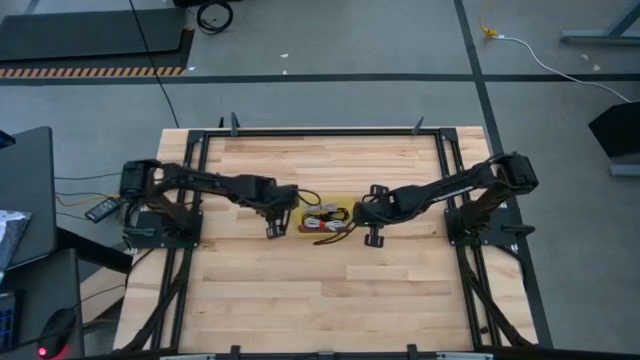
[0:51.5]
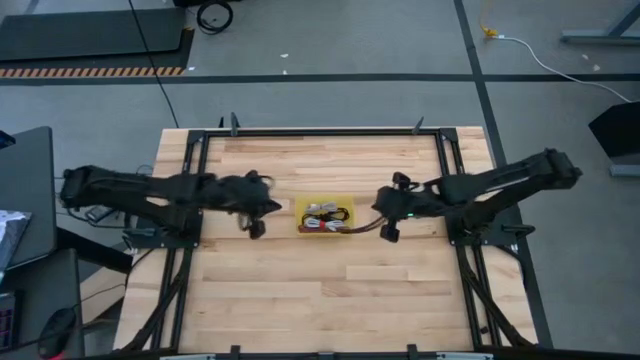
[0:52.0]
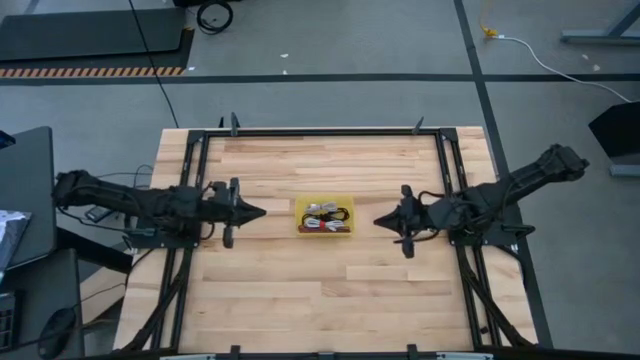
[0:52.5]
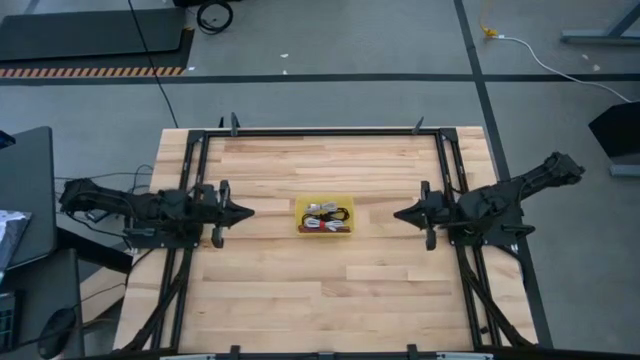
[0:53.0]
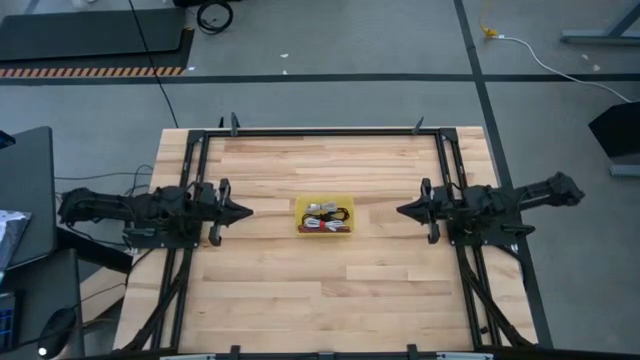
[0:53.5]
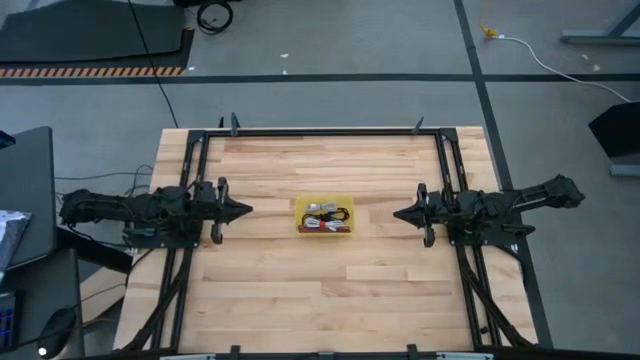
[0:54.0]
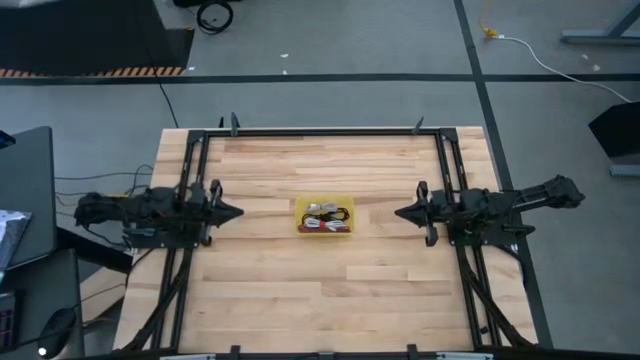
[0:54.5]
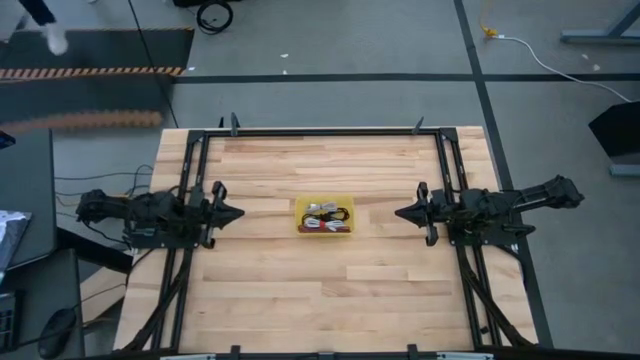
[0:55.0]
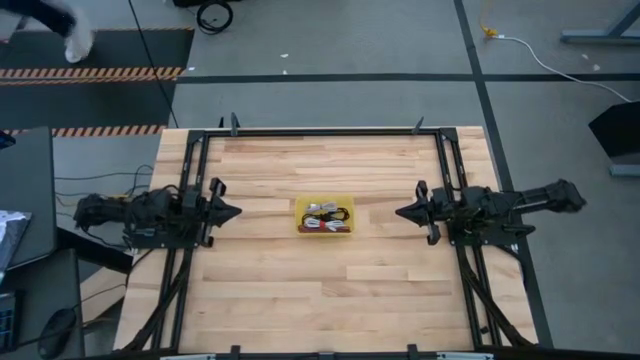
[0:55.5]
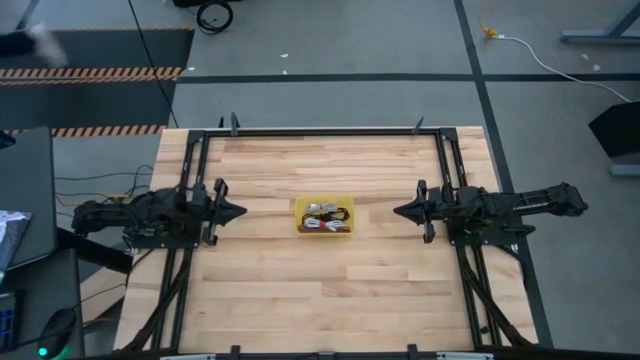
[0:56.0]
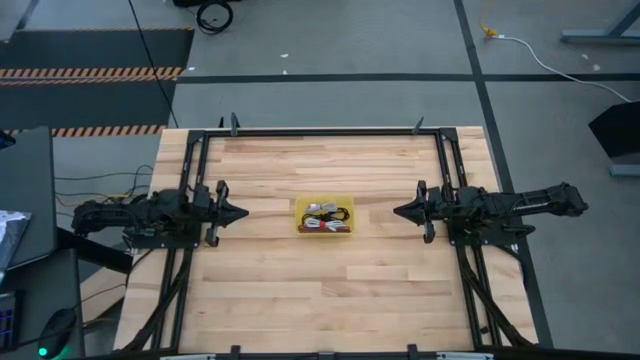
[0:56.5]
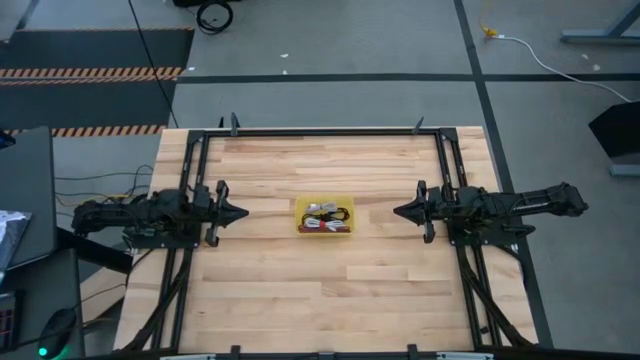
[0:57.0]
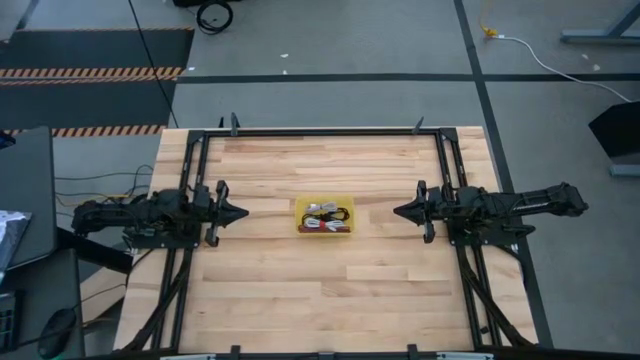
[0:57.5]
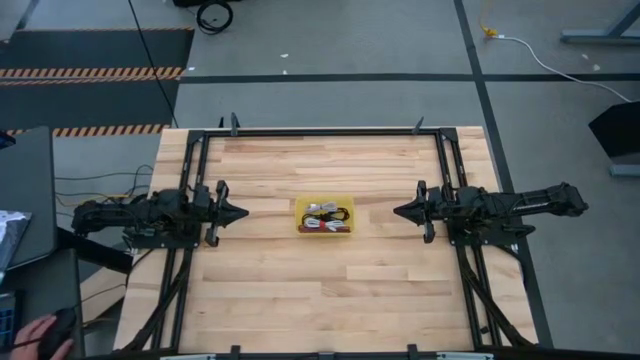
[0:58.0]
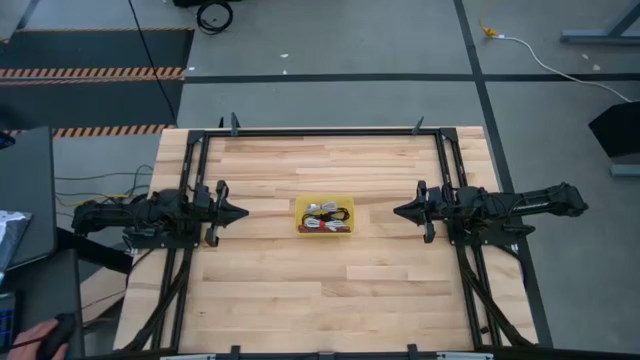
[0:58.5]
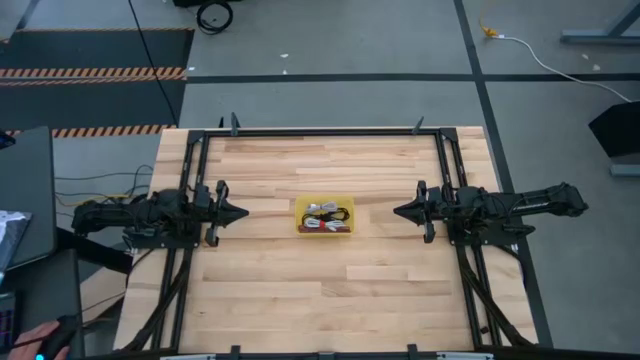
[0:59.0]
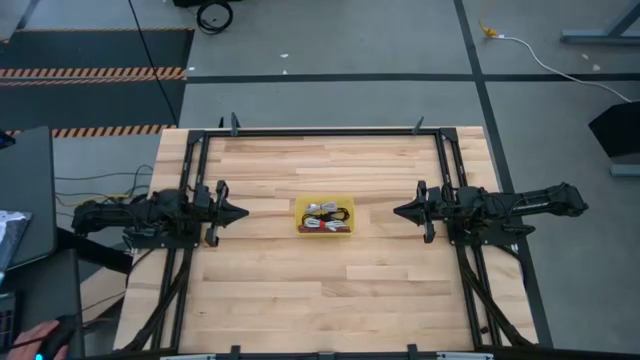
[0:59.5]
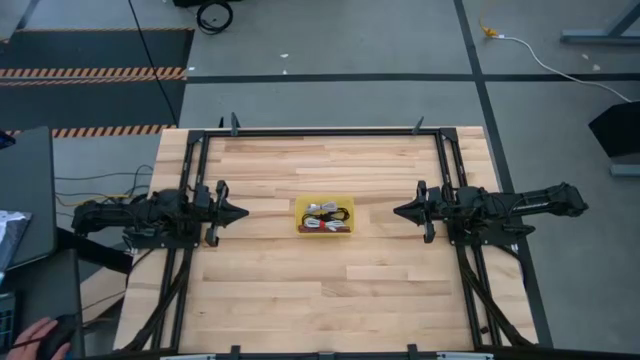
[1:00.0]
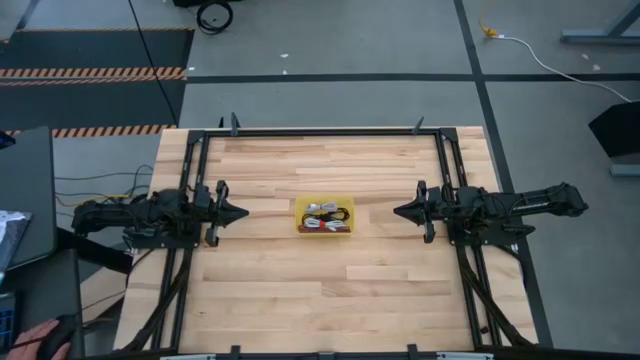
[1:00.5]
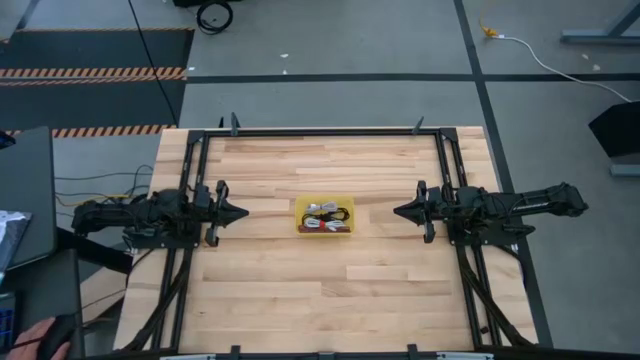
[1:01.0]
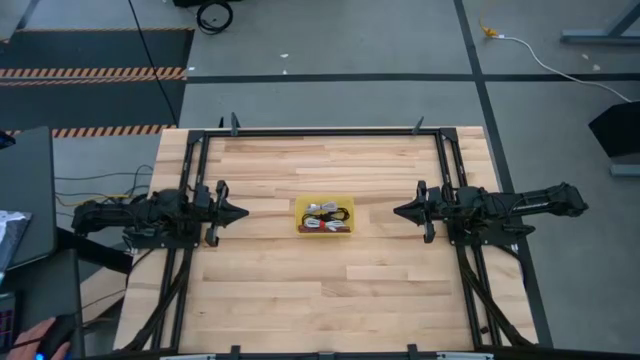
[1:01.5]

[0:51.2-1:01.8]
Task: Pick and place USB-C Cables
Return to Home Position

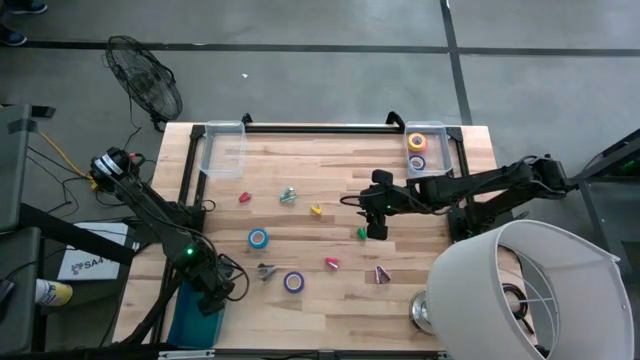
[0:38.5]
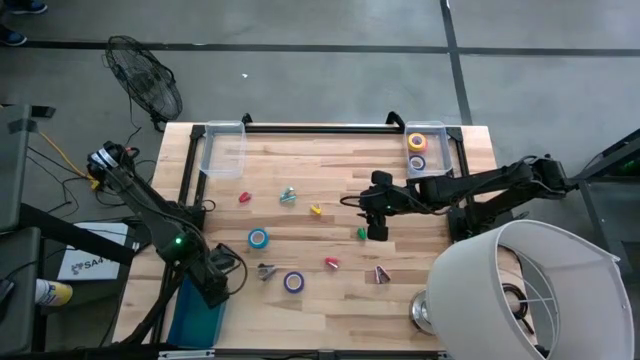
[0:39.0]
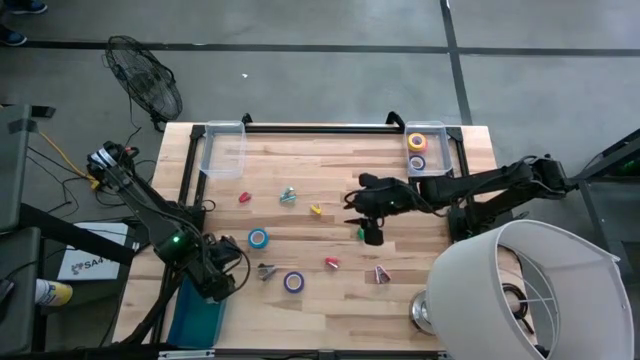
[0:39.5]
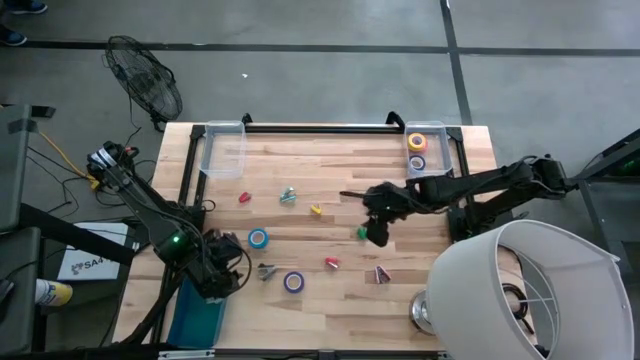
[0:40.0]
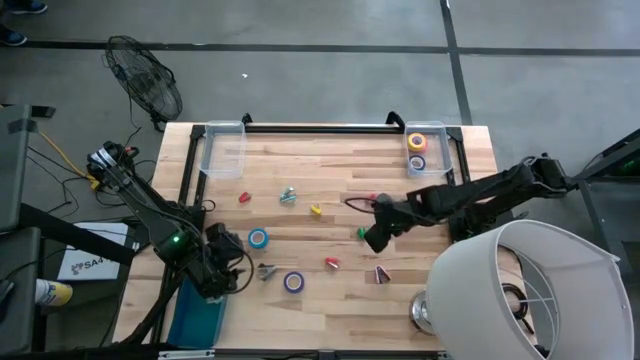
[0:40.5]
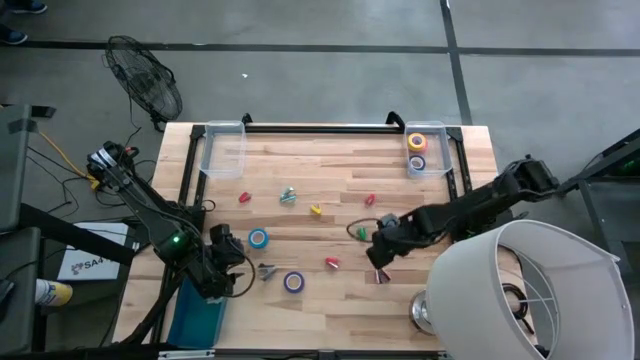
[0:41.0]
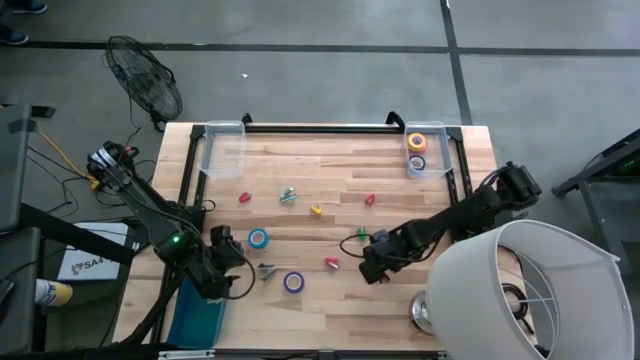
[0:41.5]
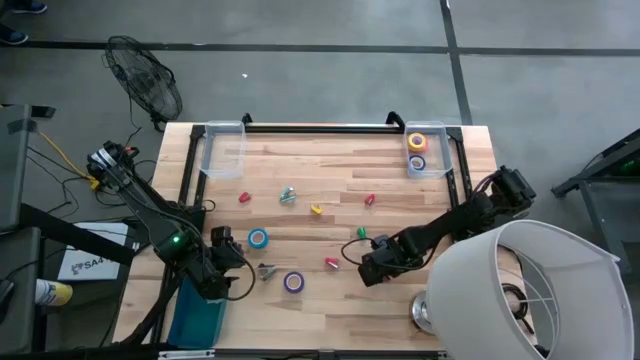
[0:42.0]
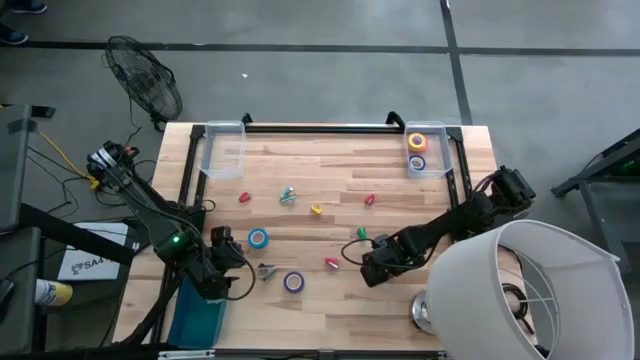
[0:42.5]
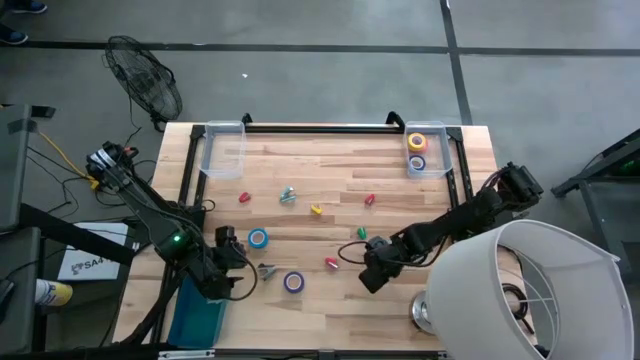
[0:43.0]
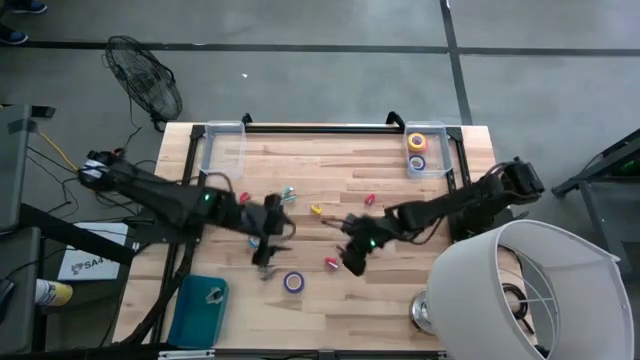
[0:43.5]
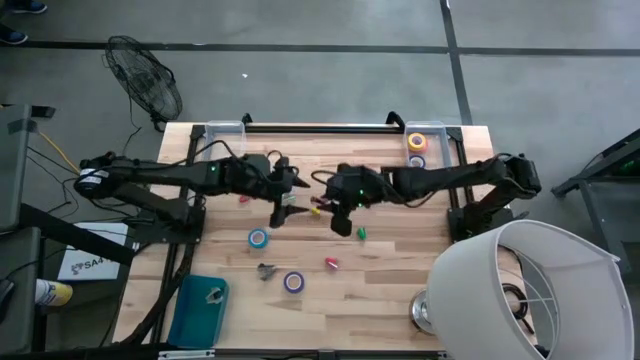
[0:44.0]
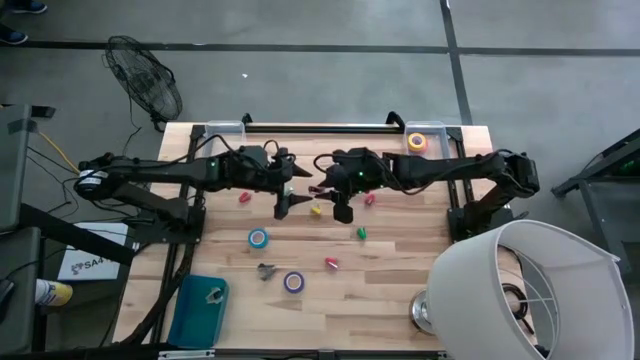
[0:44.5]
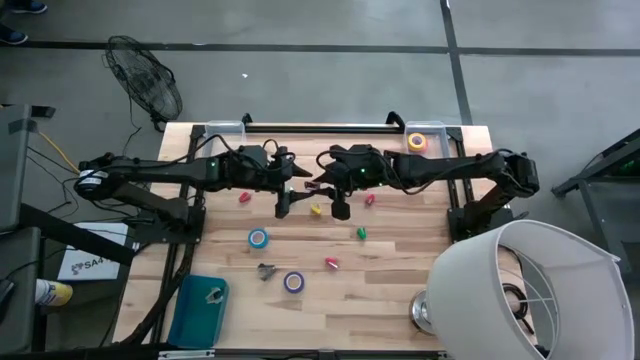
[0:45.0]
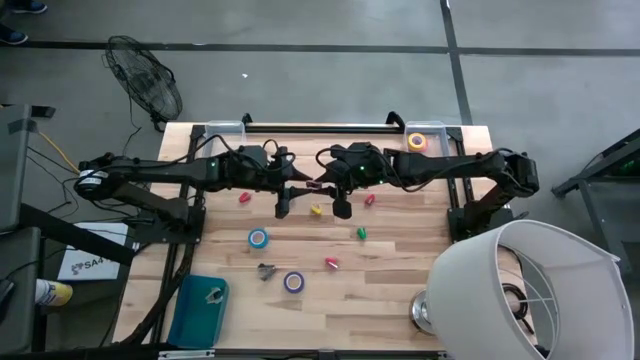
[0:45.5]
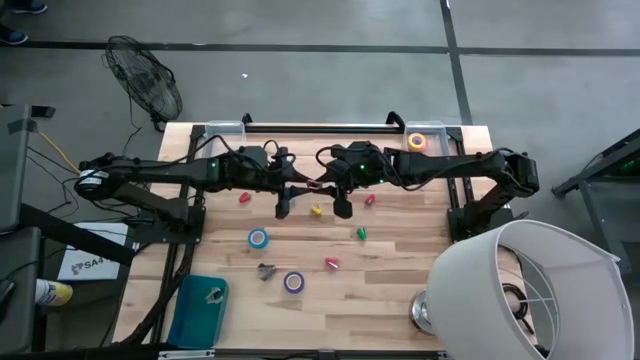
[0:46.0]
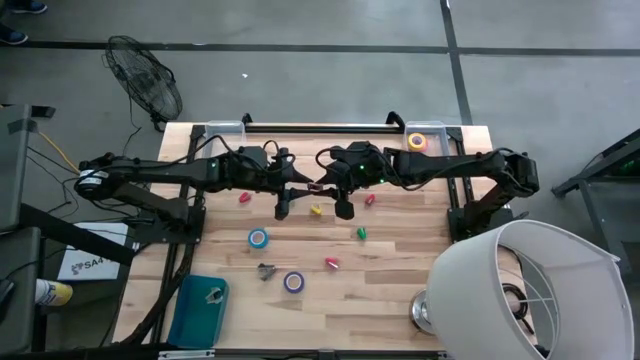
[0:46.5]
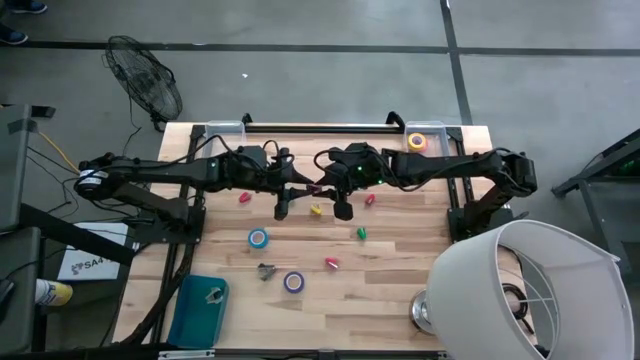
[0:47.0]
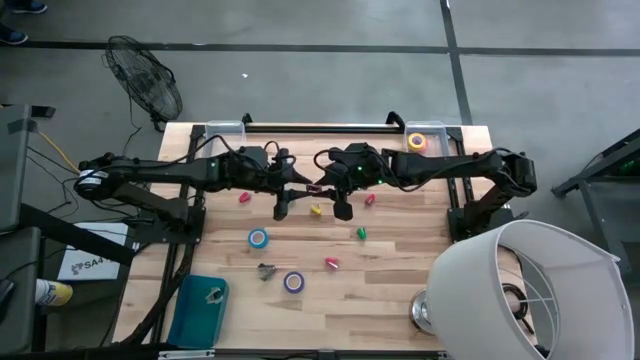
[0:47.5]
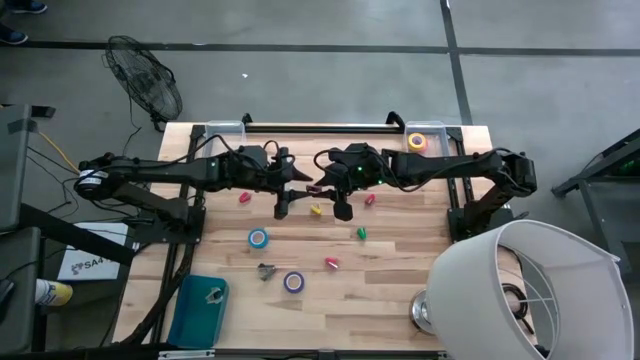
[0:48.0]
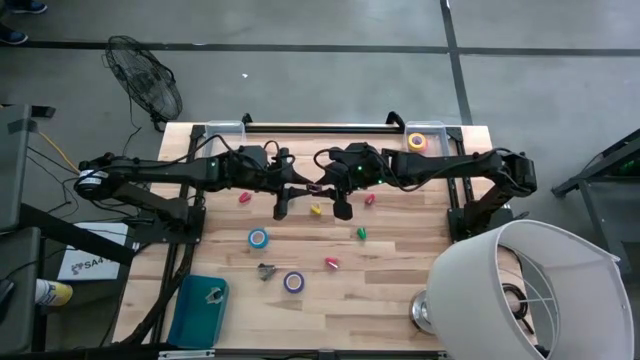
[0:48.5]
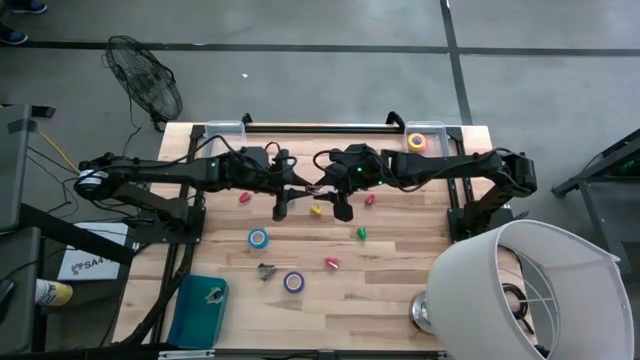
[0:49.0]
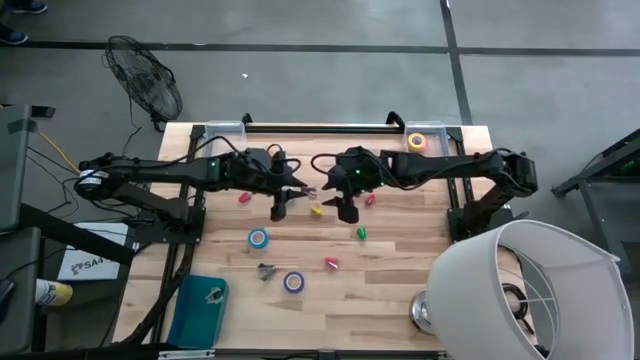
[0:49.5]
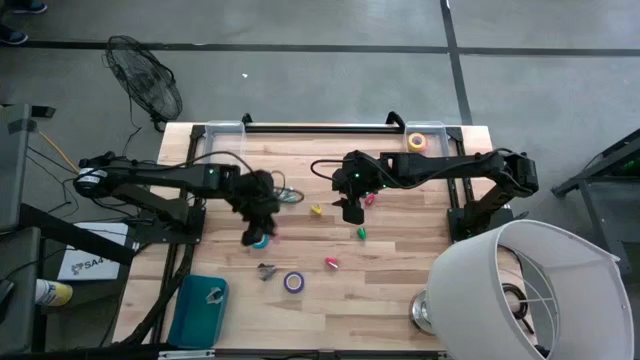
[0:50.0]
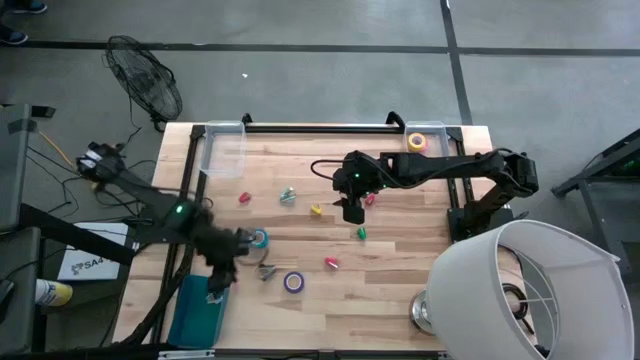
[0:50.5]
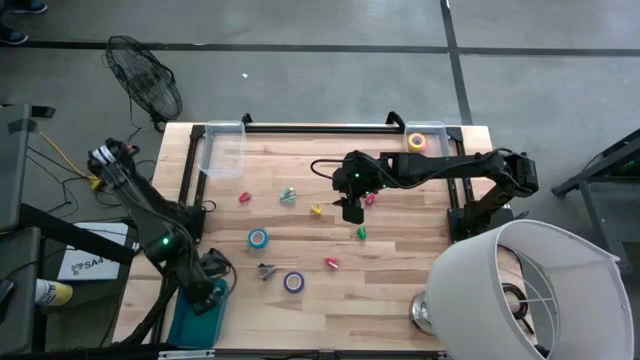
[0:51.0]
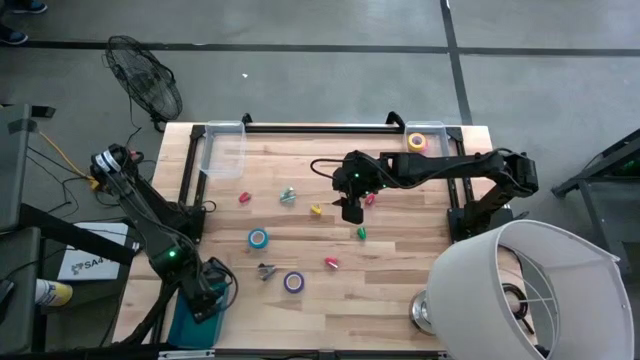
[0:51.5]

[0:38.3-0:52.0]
Task: Pick and place Stapler, Stapler remover, tape
Put the pink staple remover into the blue bin
